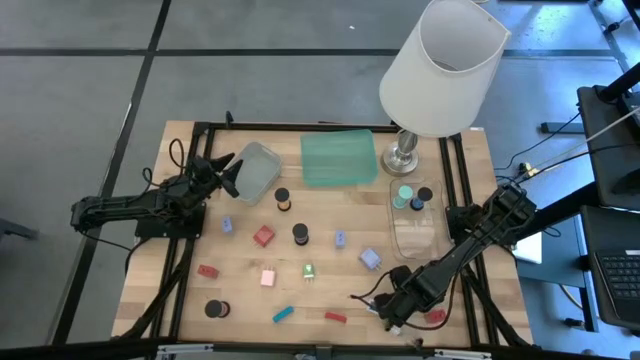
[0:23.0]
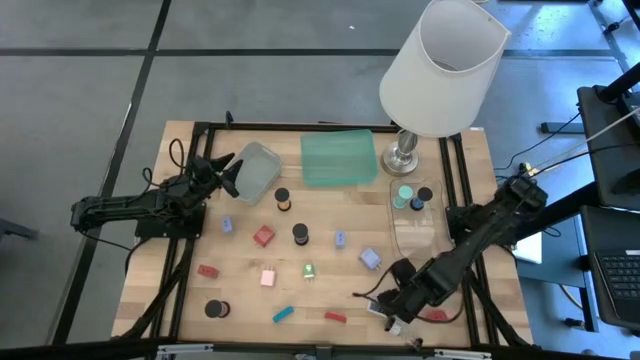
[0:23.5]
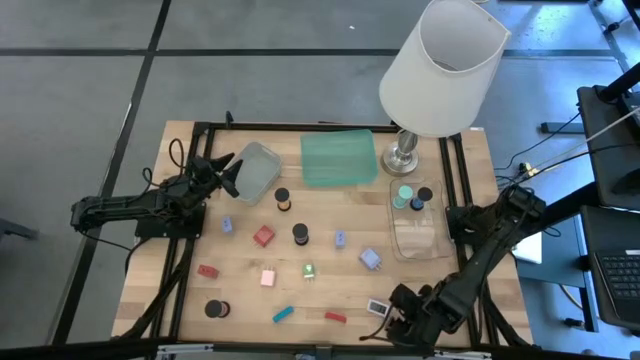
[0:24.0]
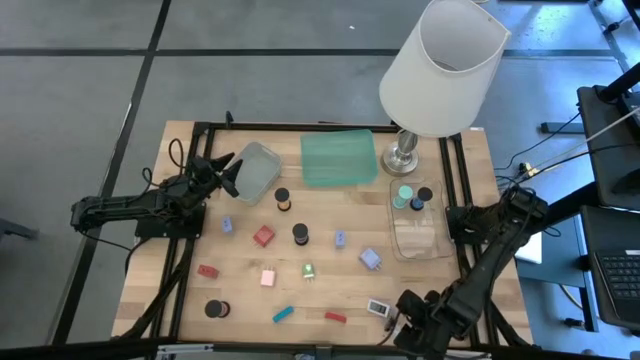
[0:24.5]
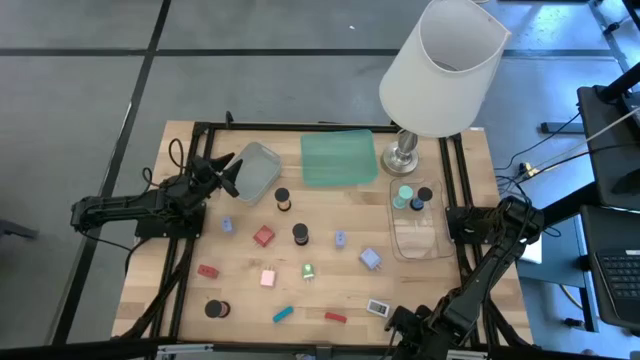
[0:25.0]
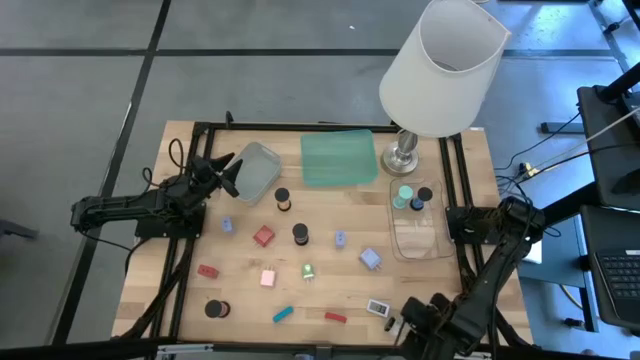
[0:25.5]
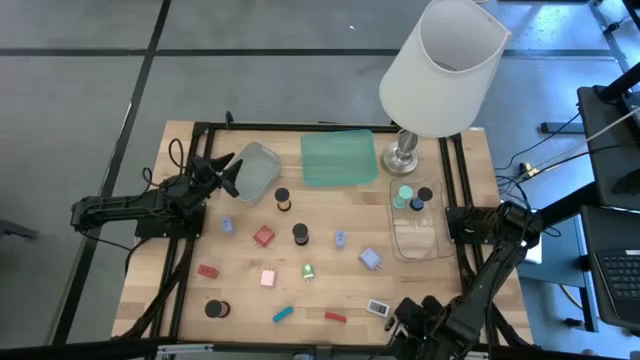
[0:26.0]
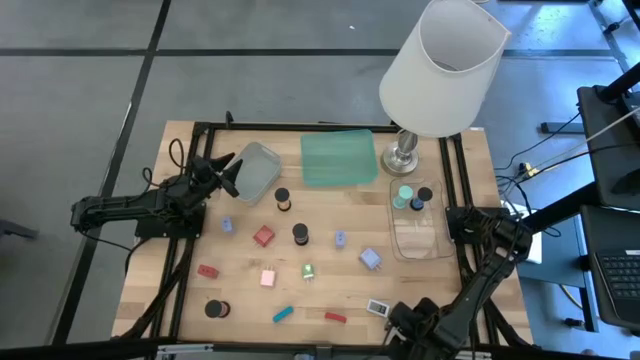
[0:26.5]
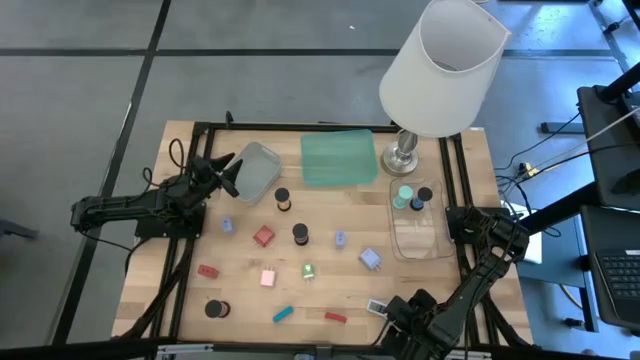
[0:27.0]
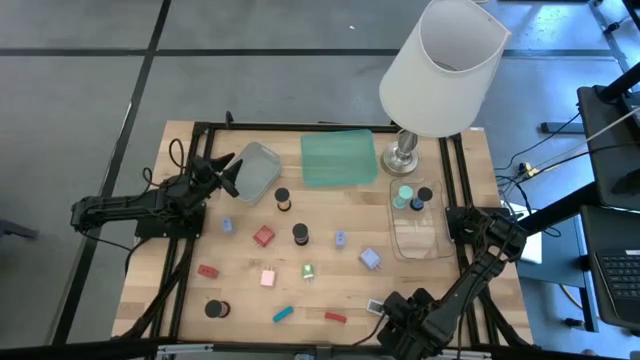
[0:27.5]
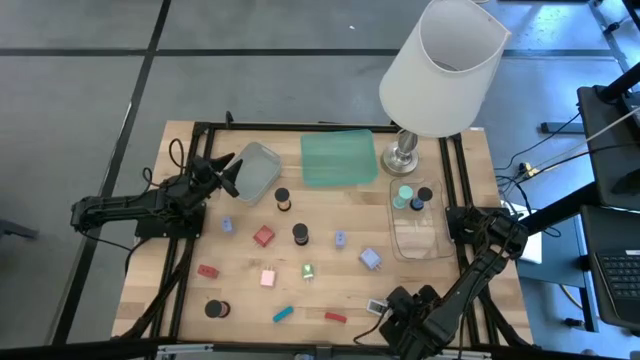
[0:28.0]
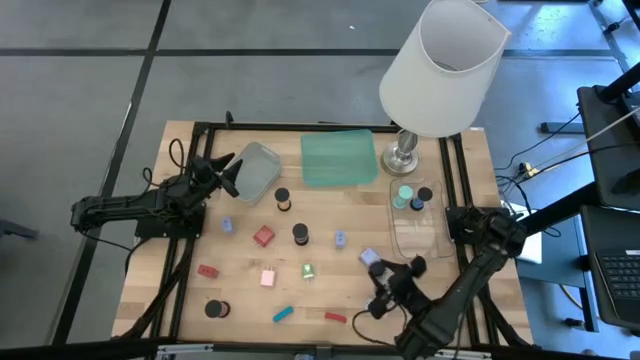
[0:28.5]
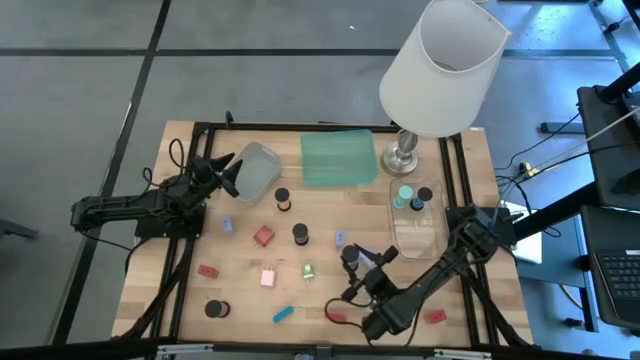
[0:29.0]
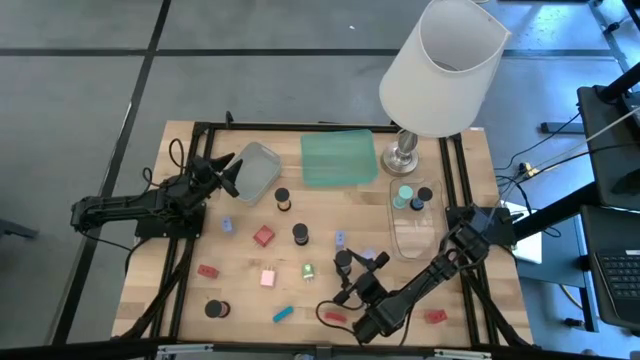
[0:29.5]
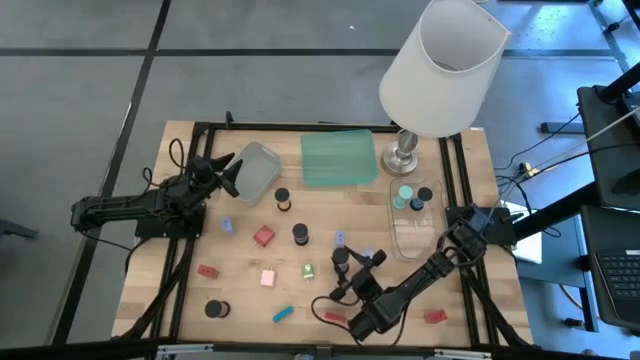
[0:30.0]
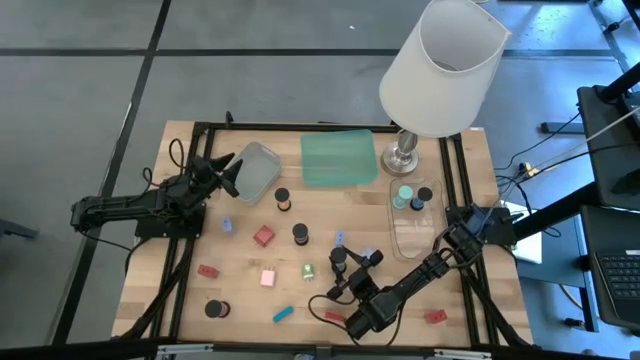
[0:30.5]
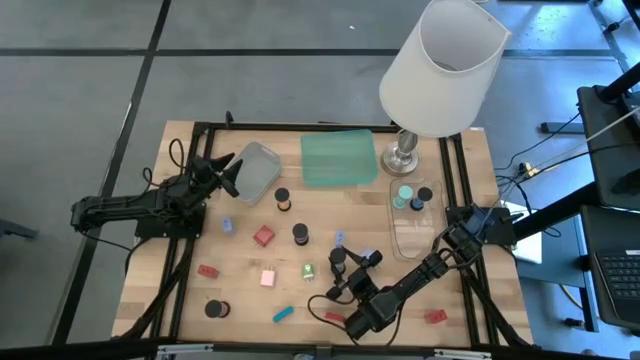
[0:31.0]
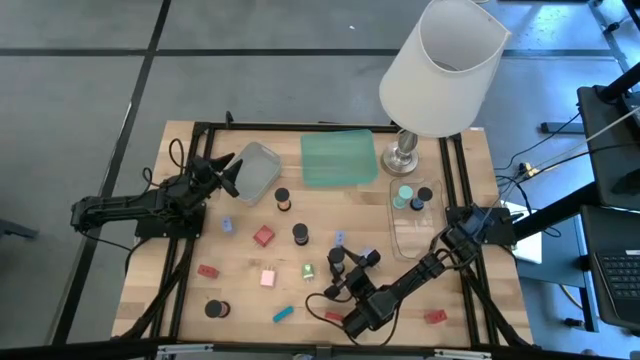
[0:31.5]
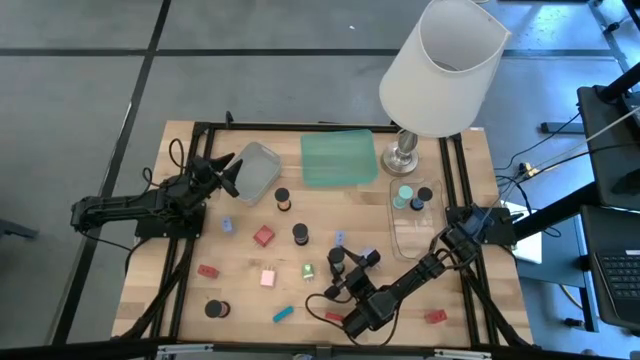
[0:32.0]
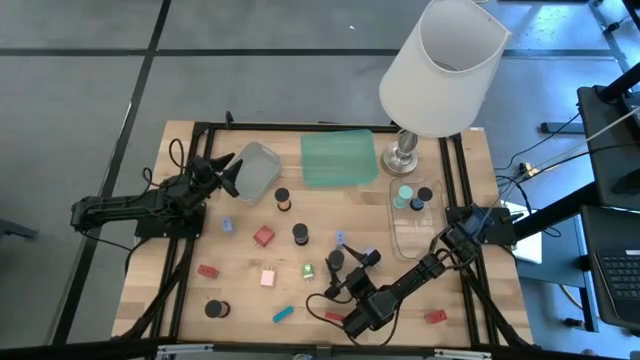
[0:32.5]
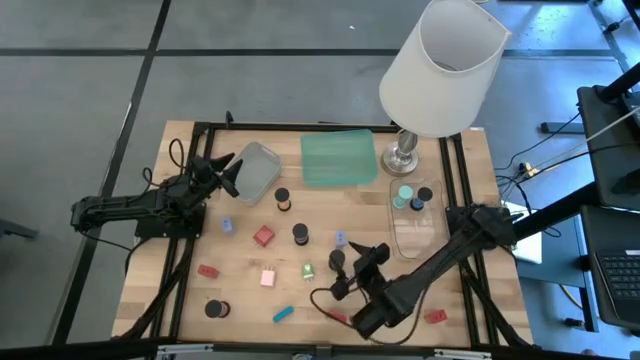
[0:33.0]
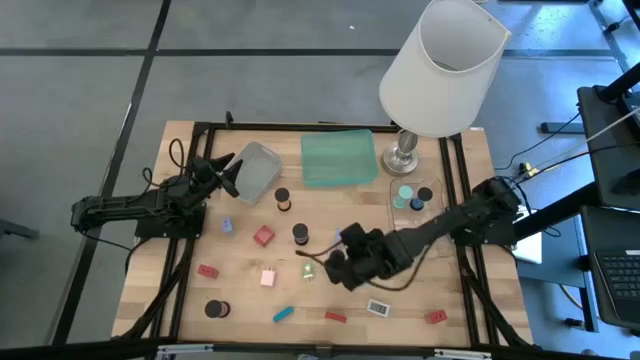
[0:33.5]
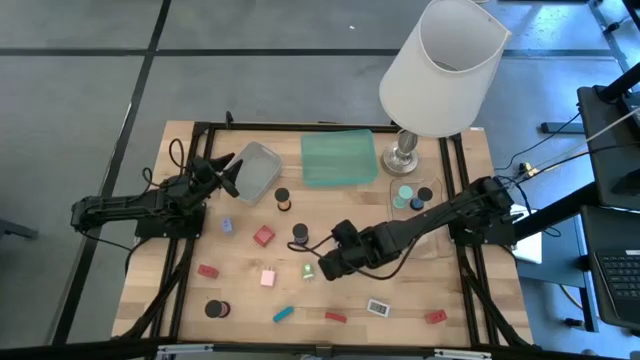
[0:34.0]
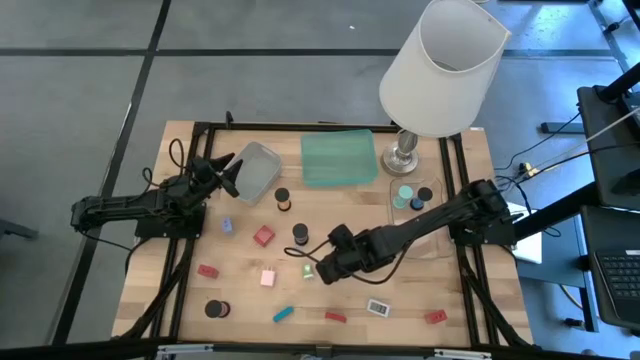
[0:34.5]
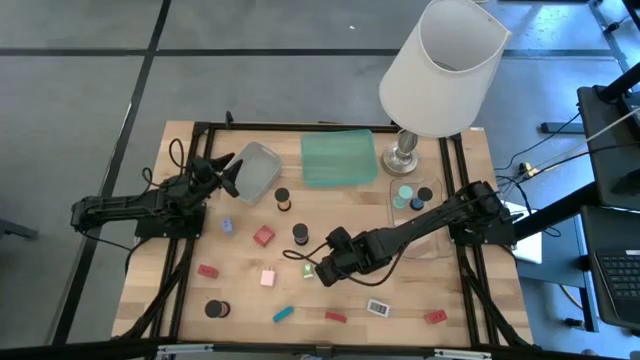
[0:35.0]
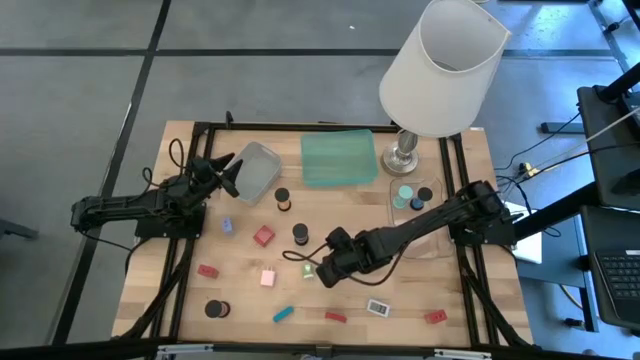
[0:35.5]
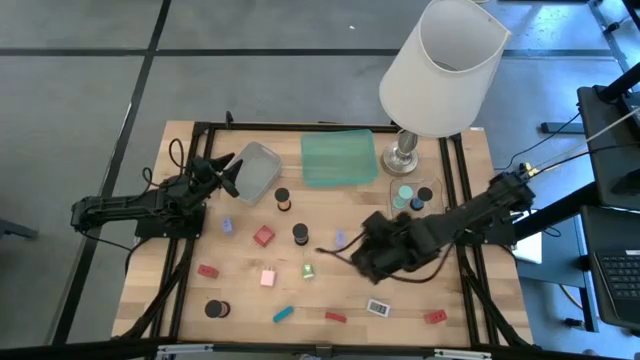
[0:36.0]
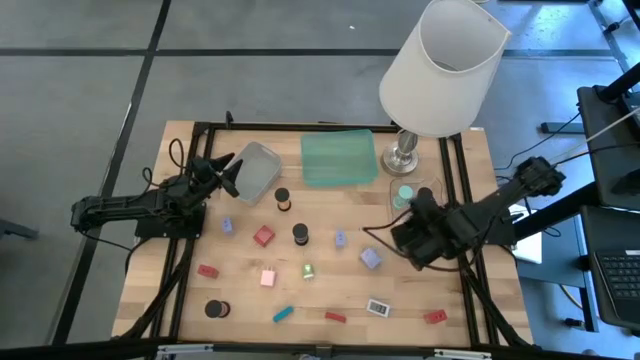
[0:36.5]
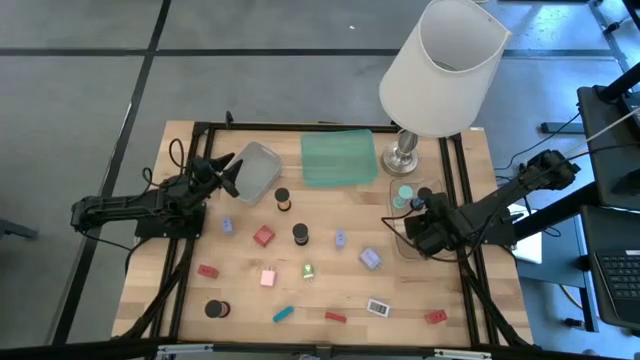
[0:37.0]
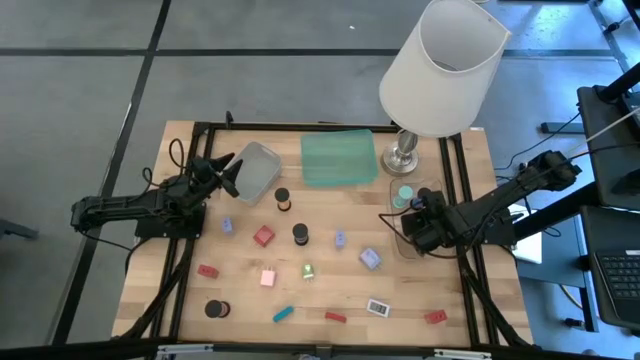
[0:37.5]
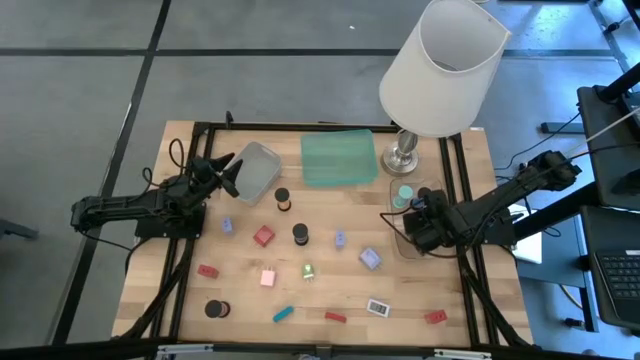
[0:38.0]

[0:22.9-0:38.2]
Task: Pick & Place Office items
Put the white hourglass into the transparent bin

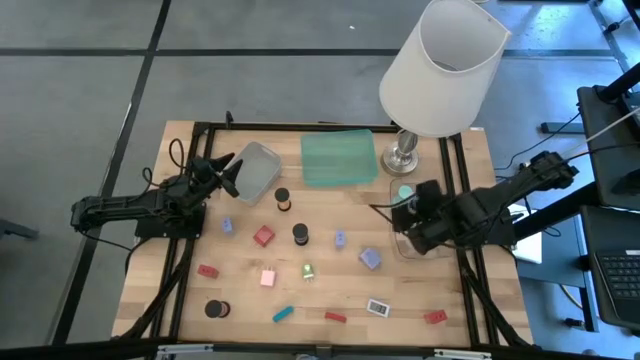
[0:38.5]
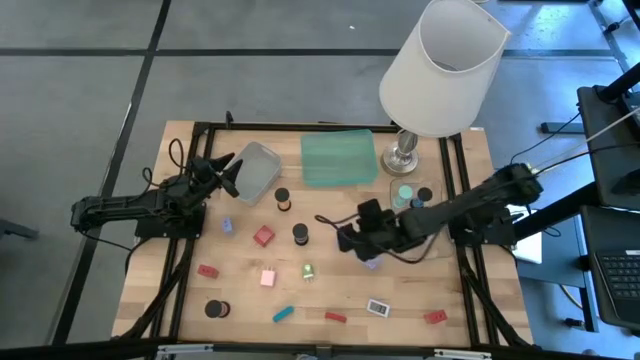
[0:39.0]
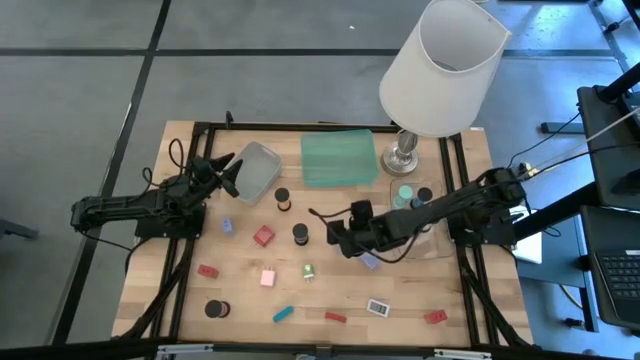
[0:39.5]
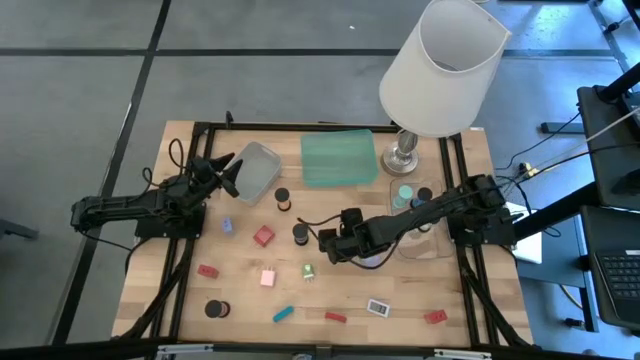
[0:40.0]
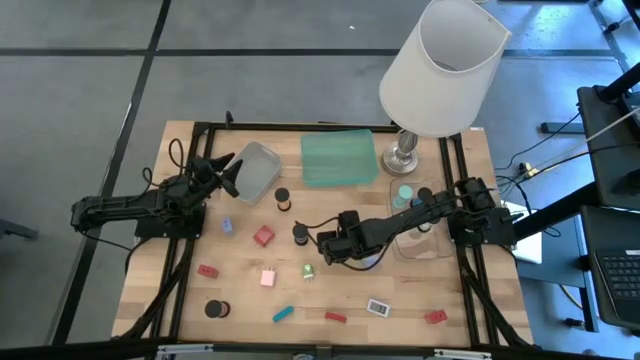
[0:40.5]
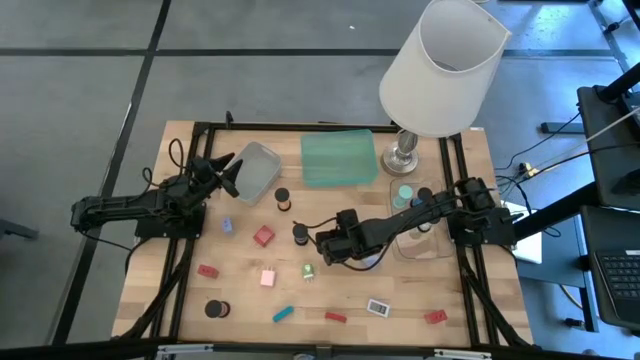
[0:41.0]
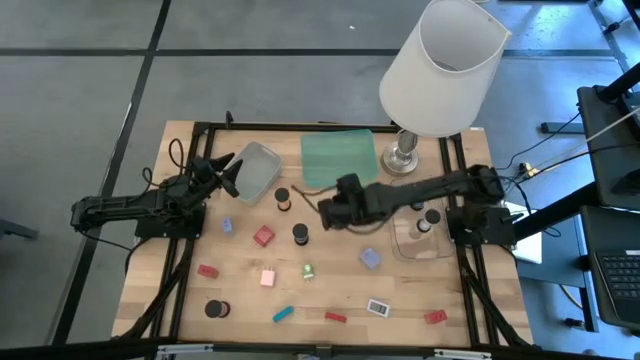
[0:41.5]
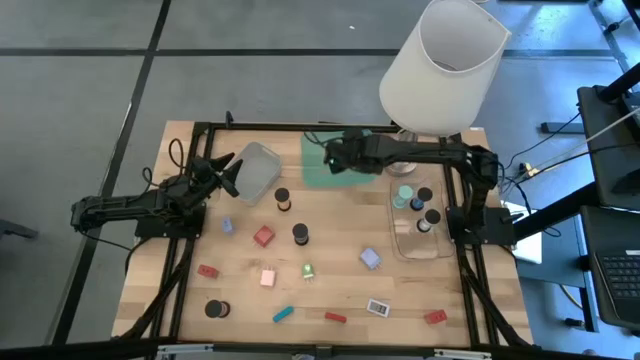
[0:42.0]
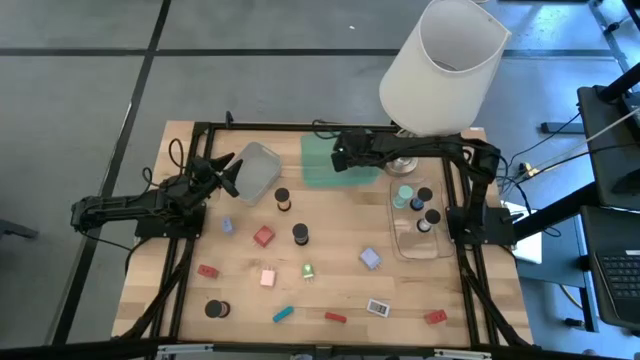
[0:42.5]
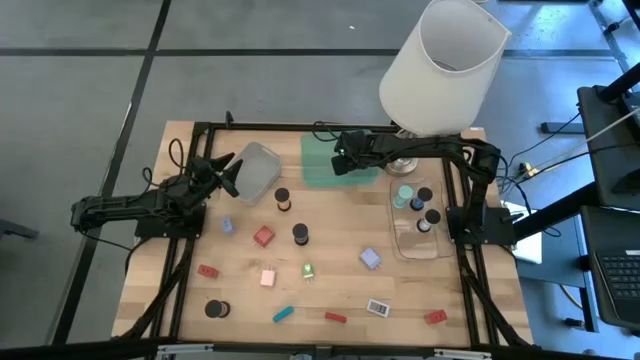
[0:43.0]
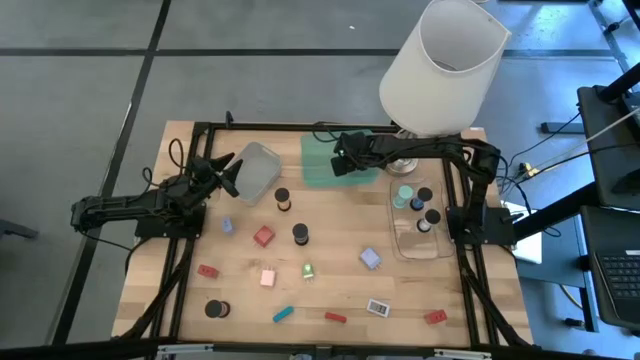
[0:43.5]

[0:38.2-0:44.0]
Put the middle purple charger adapter into the green bin
